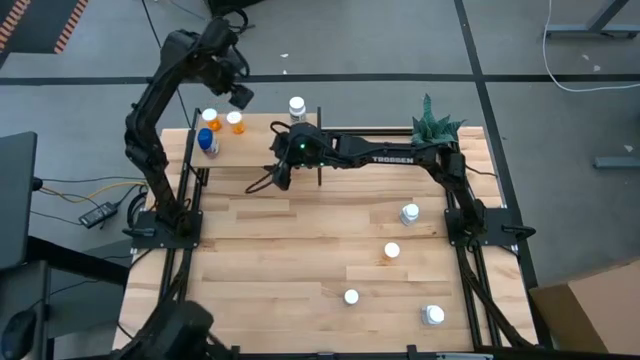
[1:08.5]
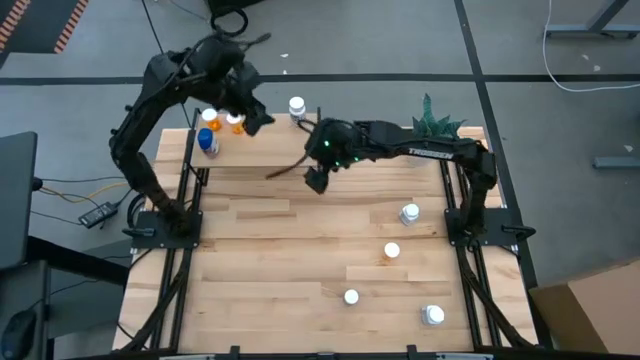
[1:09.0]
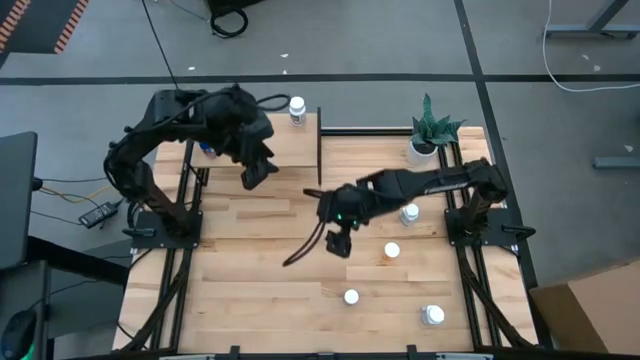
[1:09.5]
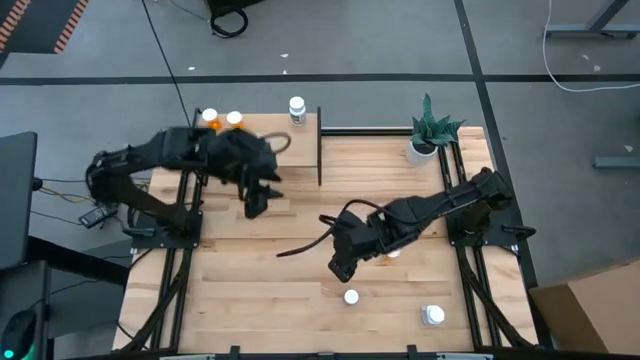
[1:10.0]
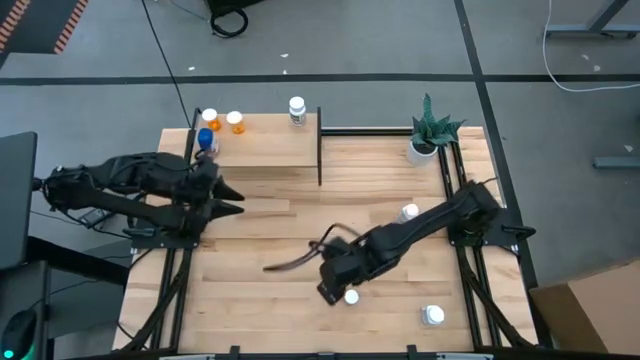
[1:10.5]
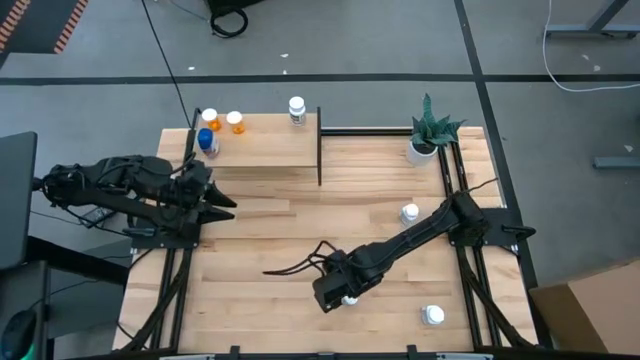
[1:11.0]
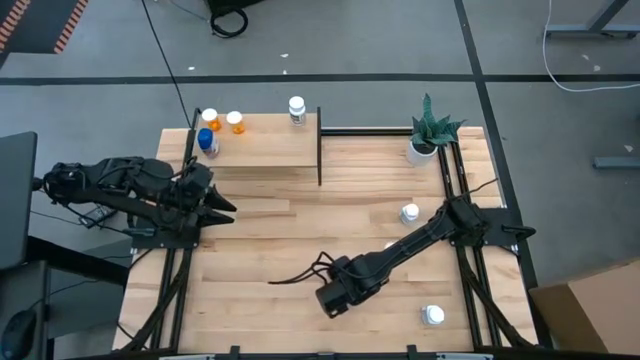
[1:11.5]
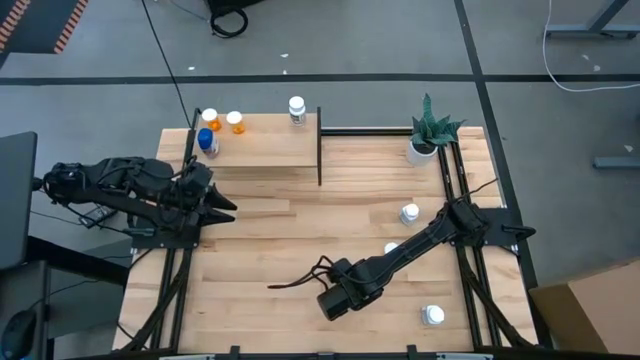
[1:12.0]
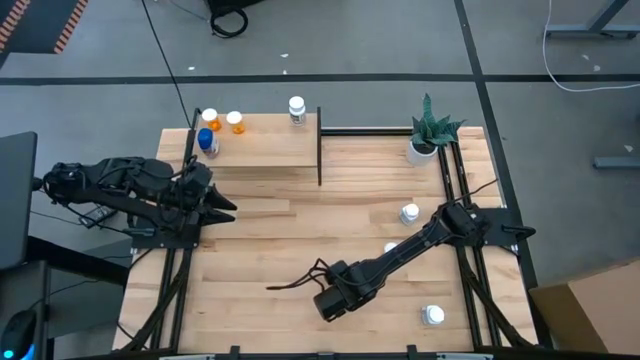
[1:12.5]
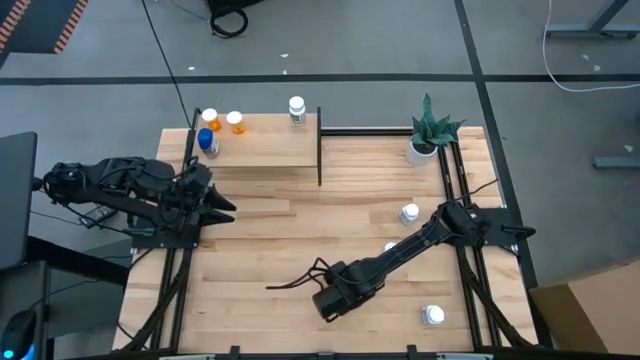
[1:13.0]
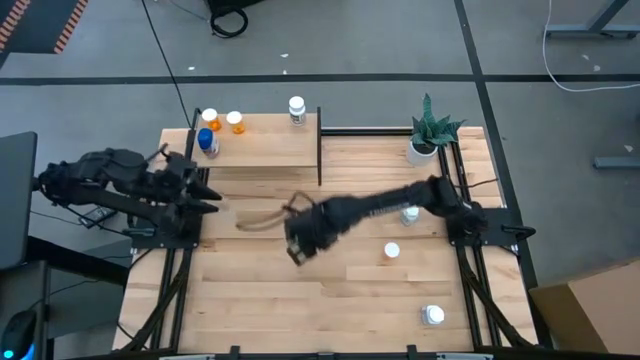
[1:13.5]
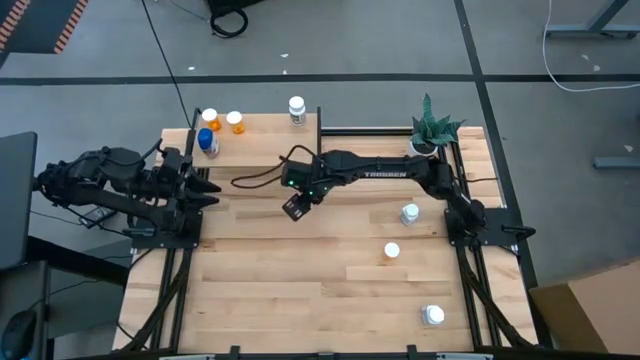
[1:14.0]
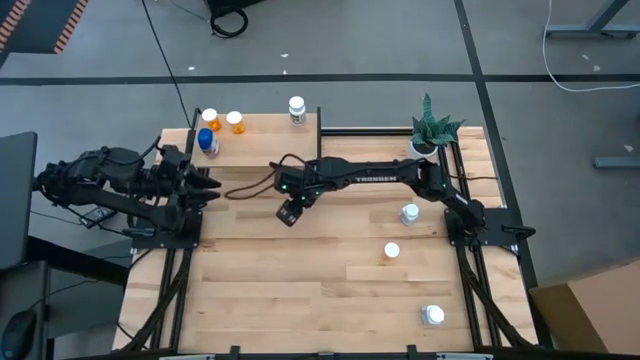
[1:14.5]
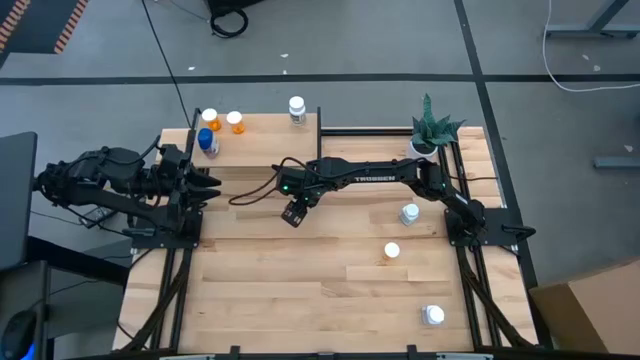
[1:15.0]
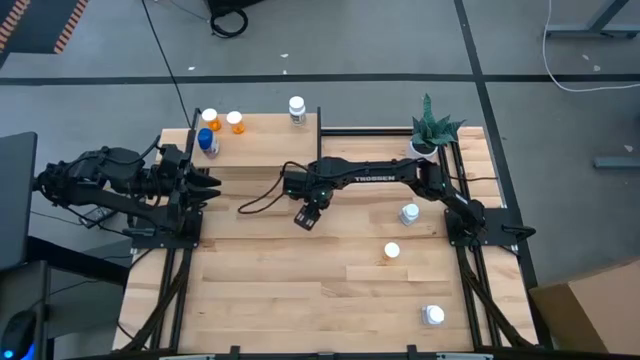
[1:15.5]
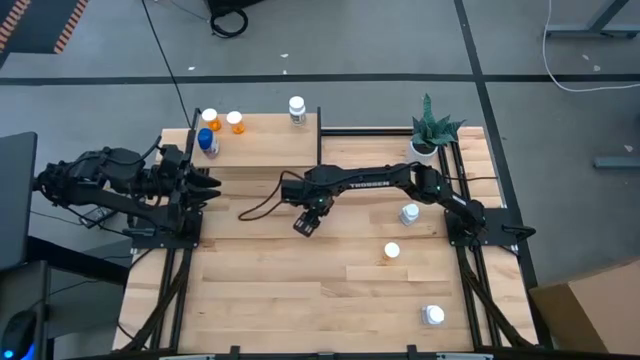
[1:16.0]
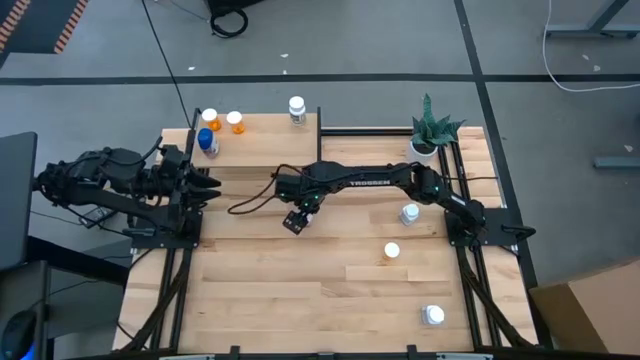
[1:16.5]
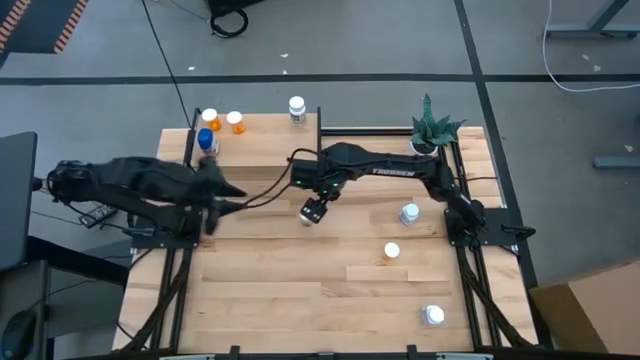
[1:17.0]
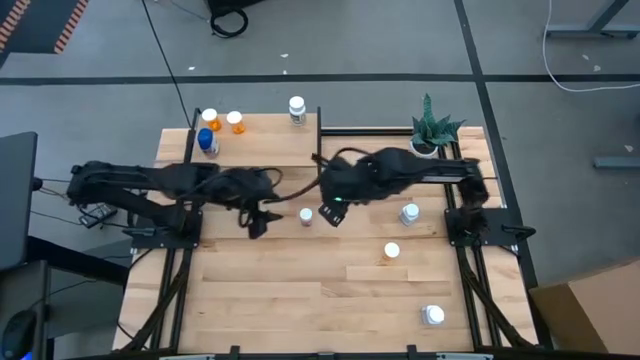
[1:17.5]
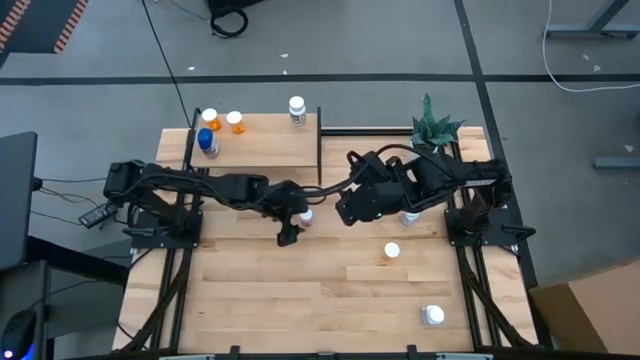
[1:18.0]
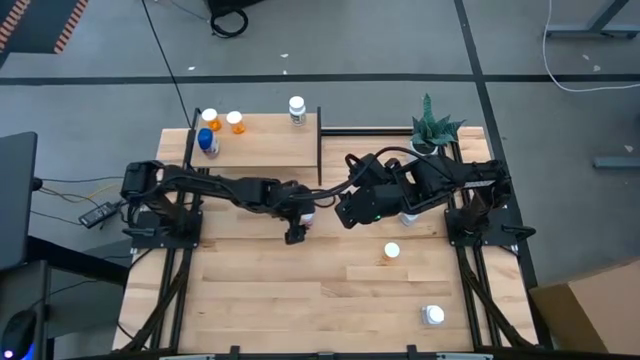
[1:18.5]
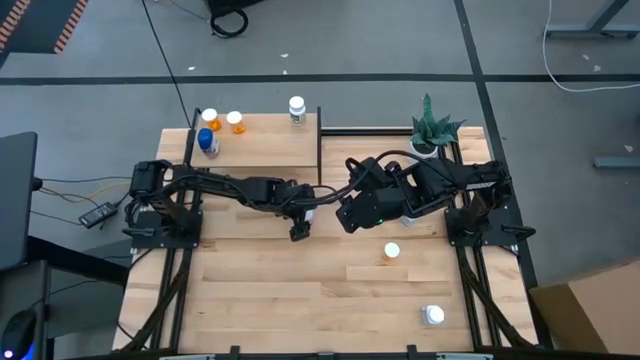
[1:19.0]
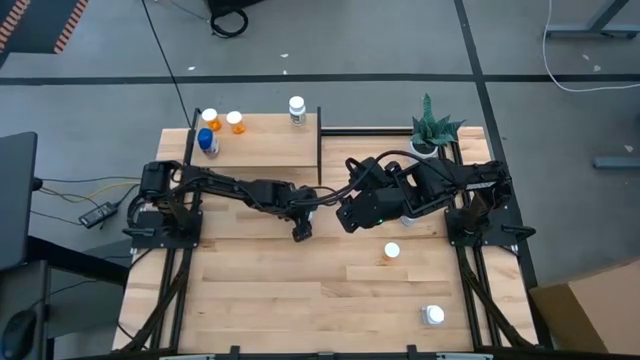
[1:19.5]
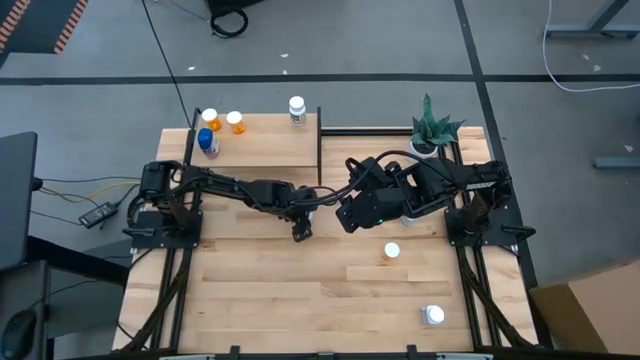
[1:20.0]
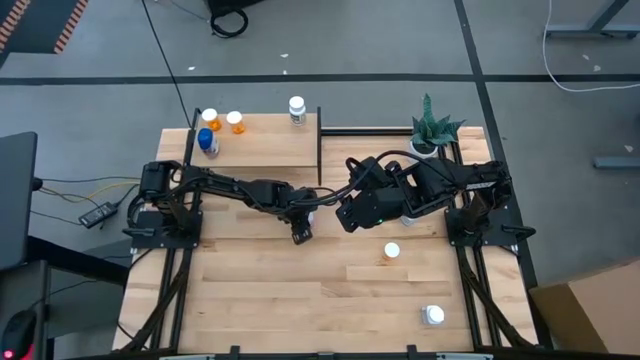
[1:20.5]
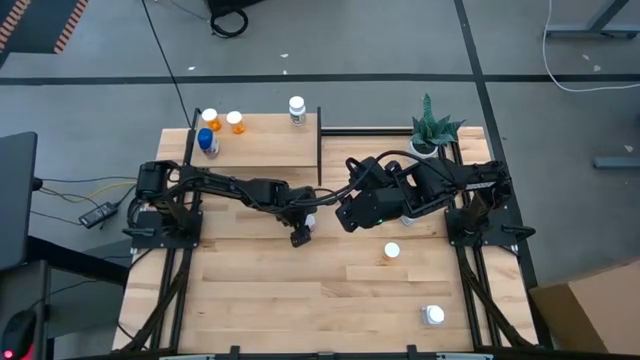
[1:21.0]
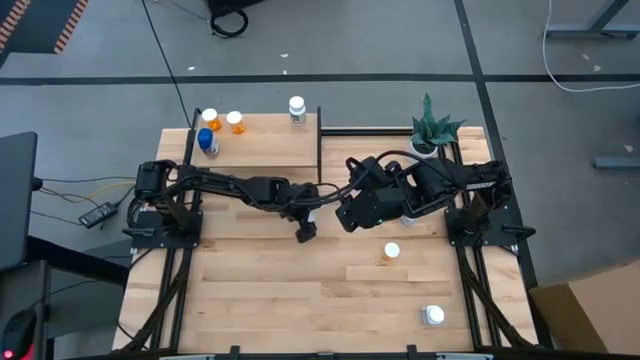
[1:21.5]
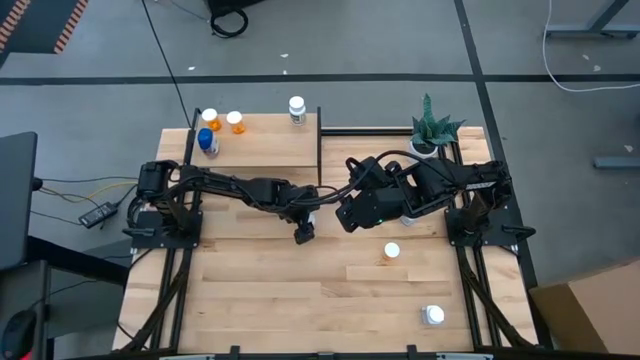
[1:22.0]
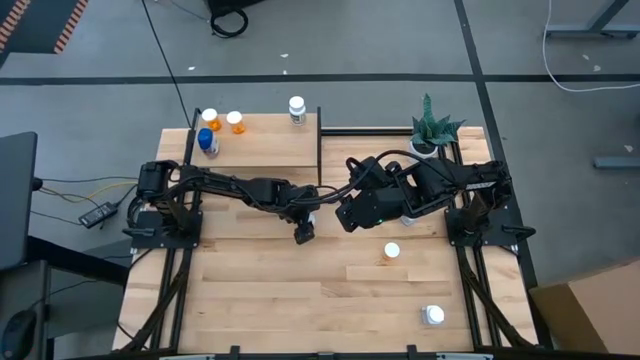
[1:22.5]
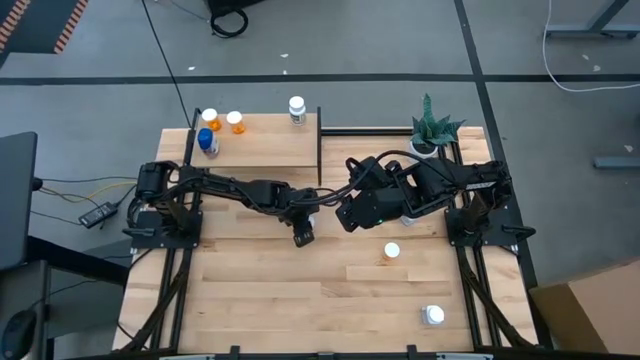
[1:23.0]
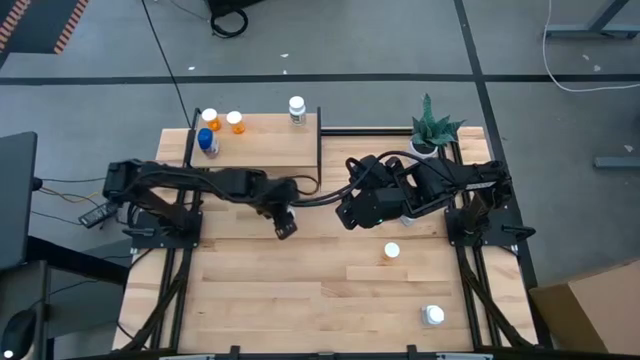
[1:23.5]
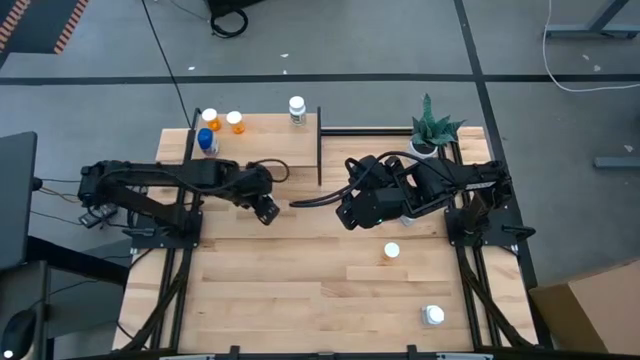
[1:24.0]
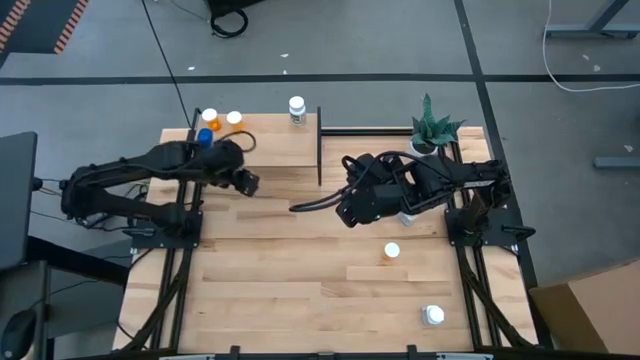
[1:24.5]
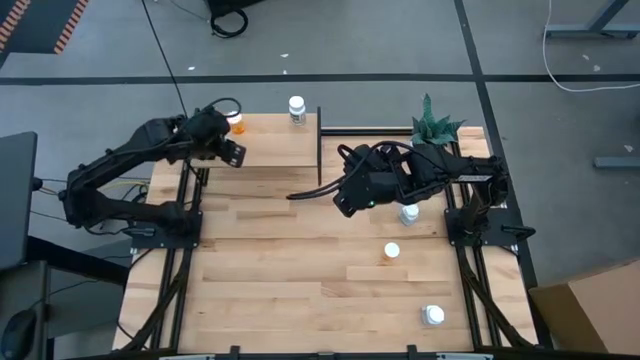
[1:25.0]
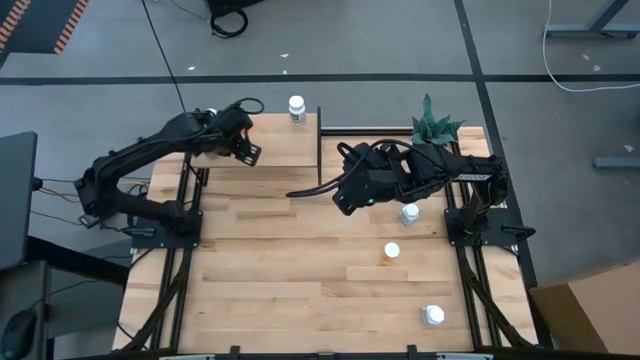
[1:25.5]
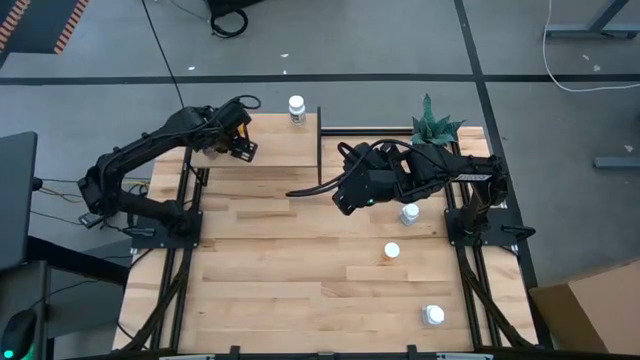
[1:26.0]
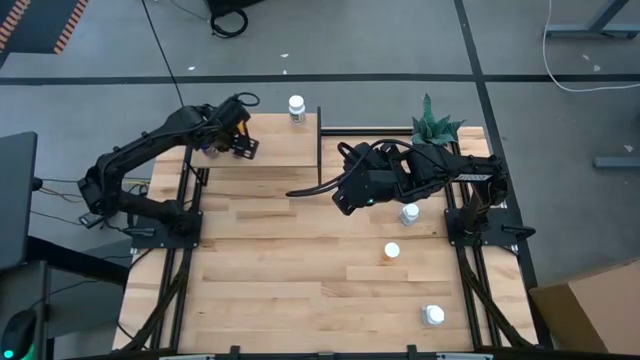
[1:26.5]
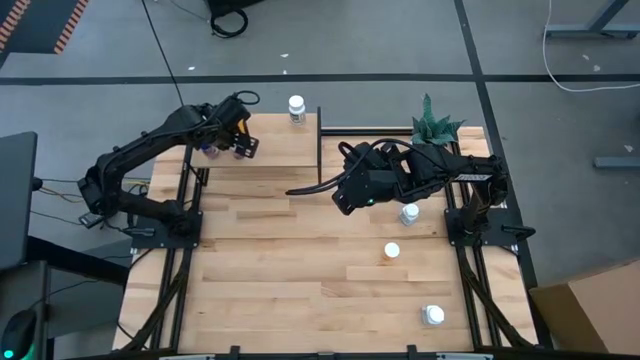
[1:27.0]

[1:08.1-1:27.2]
Task: Pick and place medicine bottles onto shelf by color
Put the pink pill bottle on the shelf

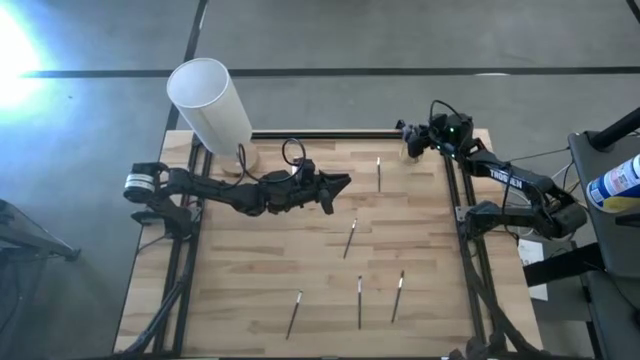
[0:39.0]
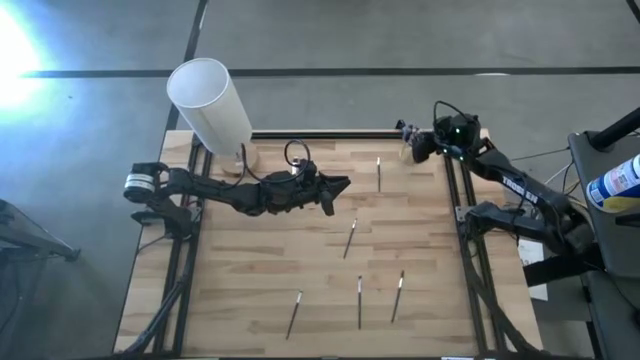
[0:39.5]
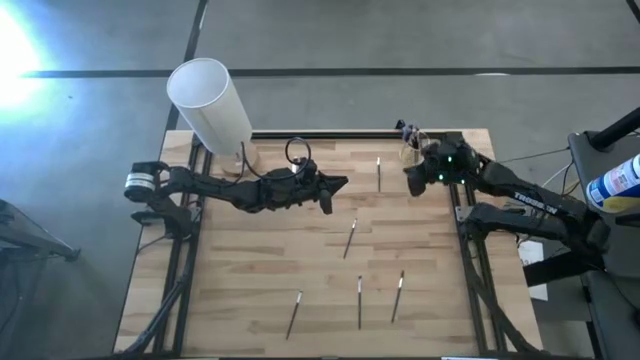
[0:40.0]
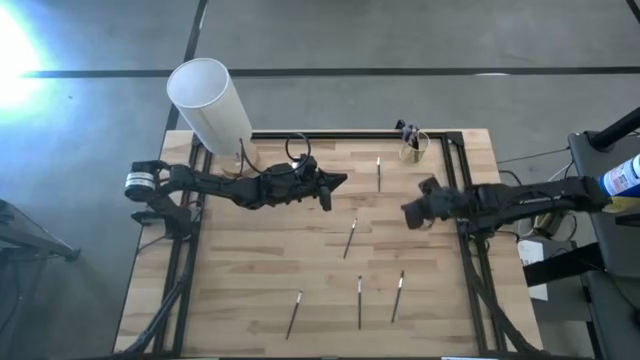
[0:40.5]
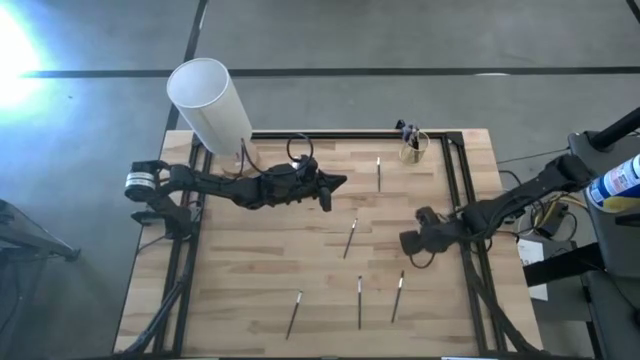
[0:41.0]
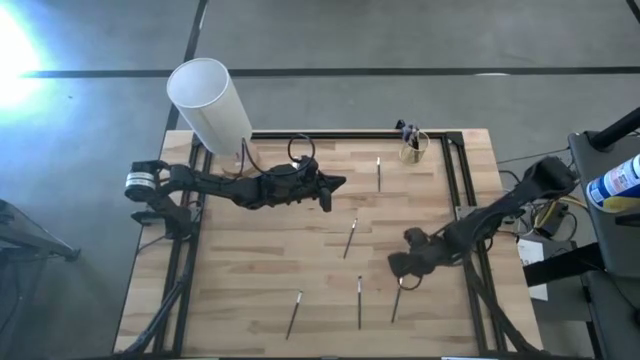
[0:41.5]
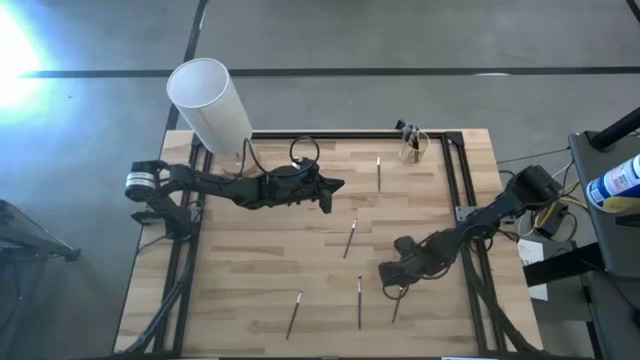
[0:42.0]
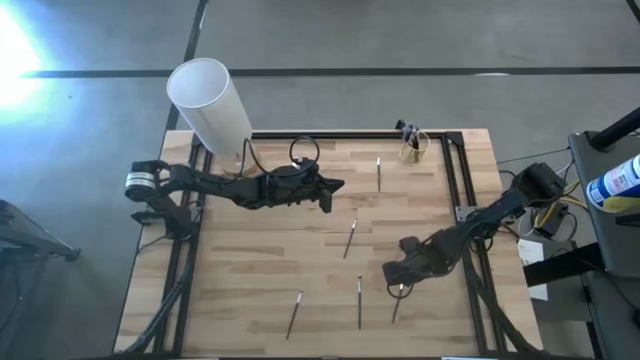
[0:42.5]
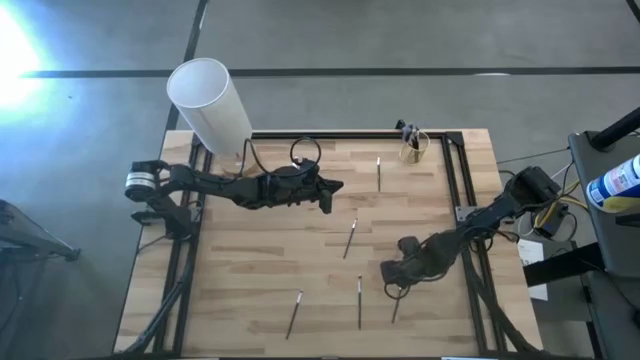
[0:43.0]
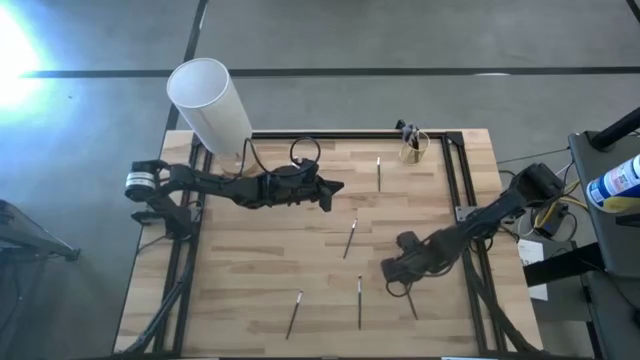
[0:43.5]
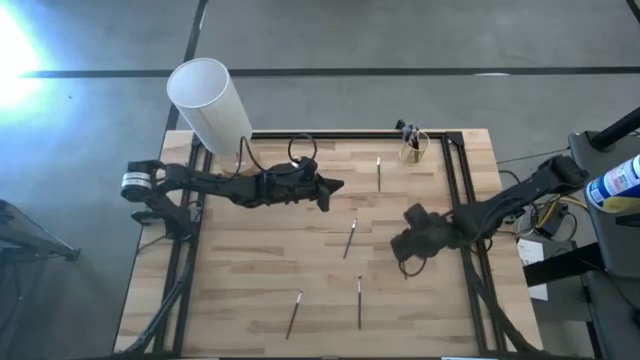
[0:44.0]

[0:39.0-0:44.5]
Task: Put items in baskets/containers
Put the lash brush into the yellow container
